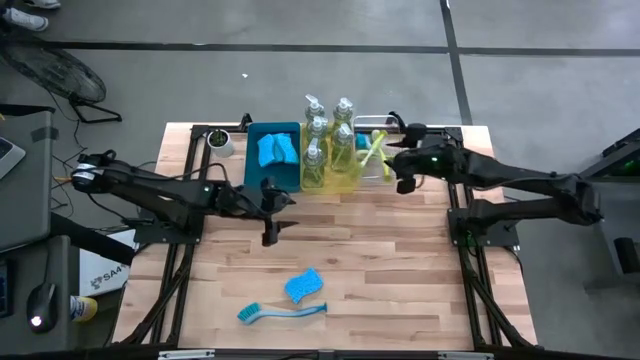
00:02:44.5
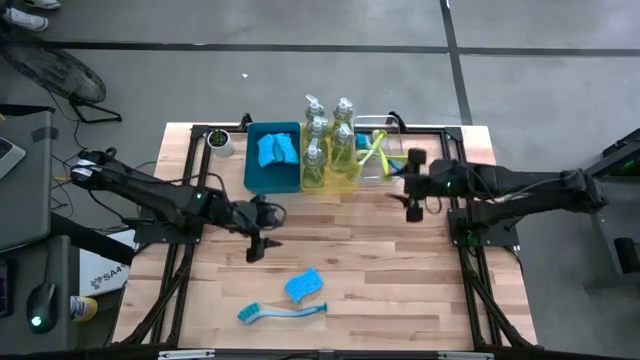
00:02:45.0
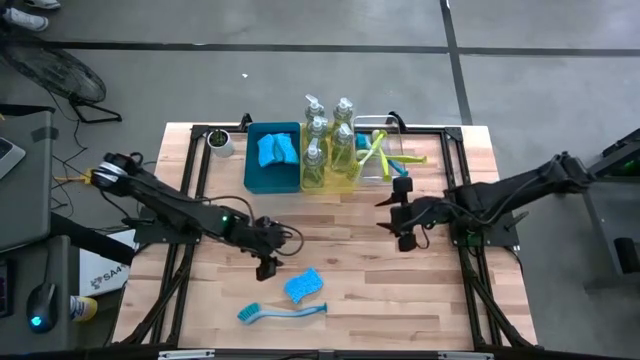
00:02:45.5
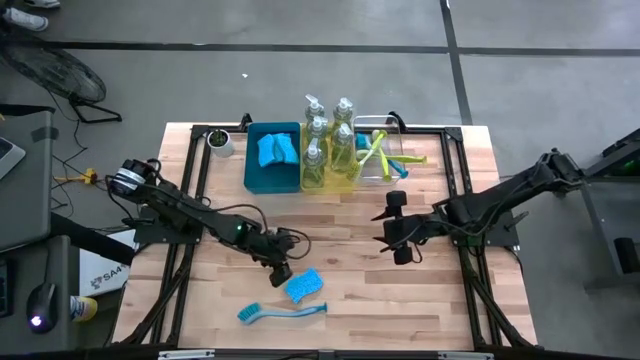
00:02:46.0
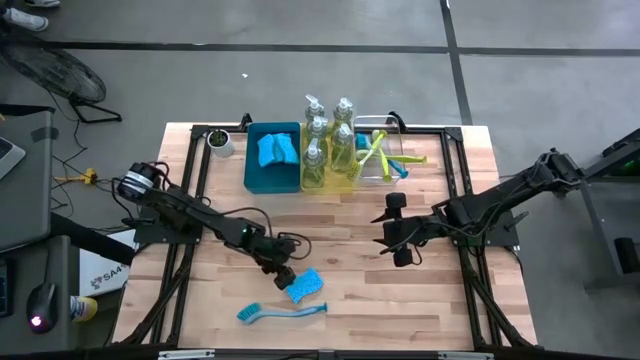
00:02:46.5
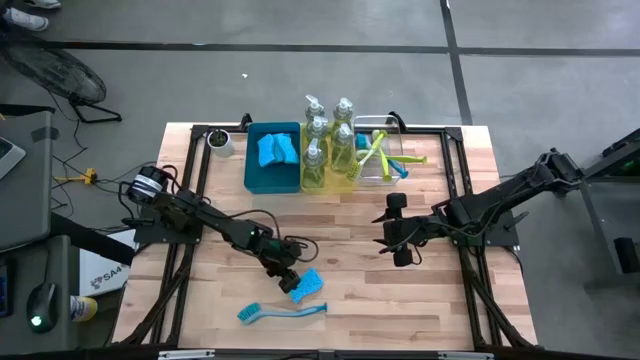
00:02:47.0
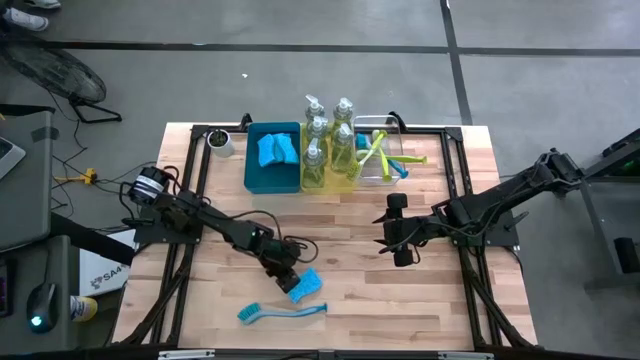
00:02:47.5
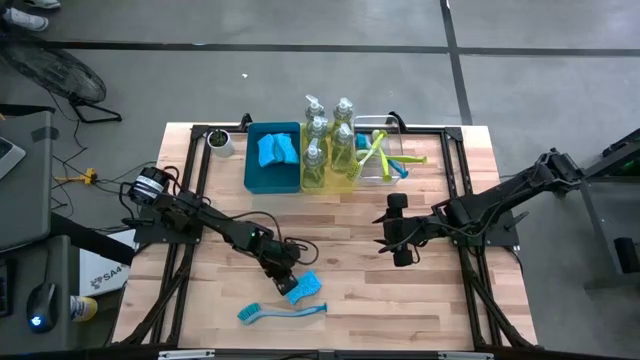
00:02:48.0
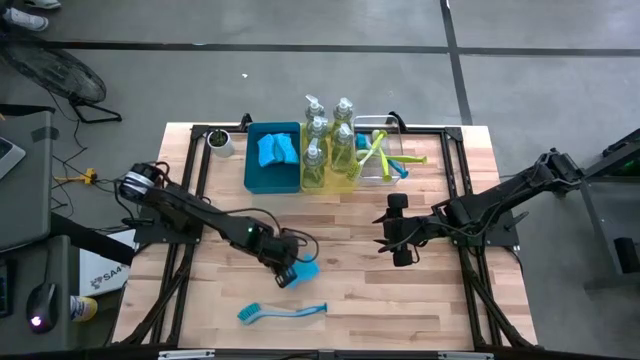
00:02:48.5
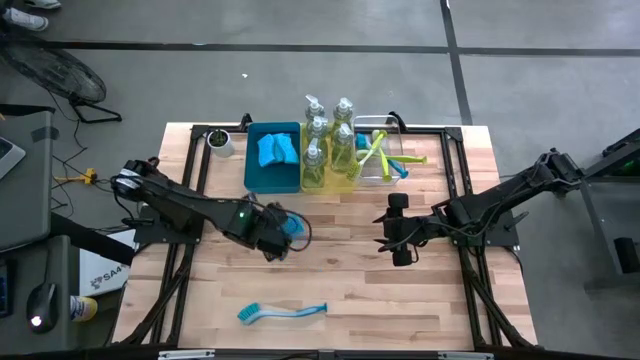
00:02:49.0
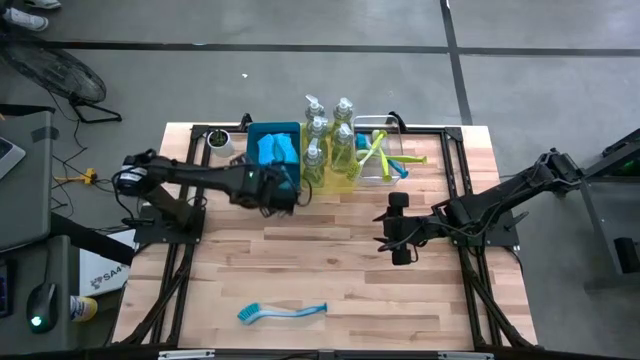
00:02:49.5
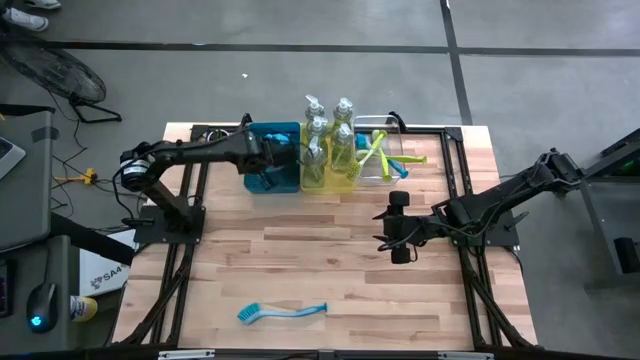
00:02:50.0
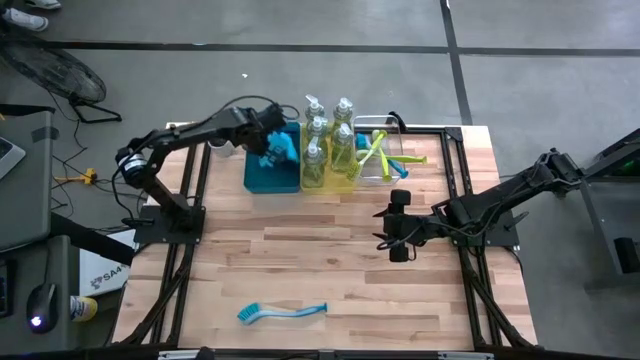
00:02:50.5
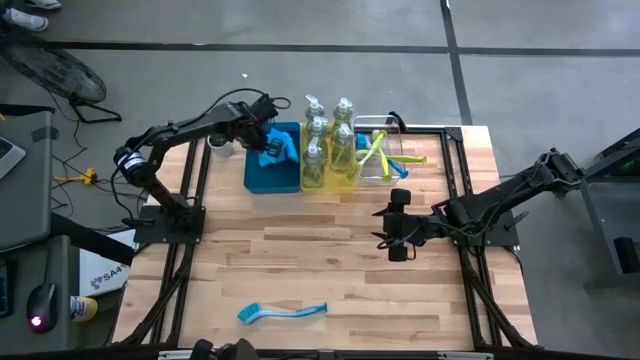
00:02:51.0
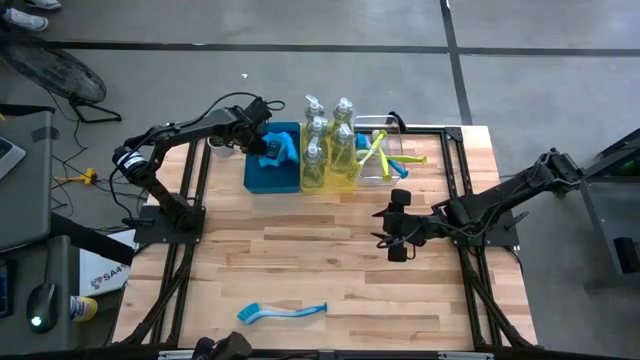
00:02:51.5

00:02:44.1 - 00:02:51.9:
Task: Pick & Place Kitchen Sink Supplies
Put the blue sponge into the blue bin

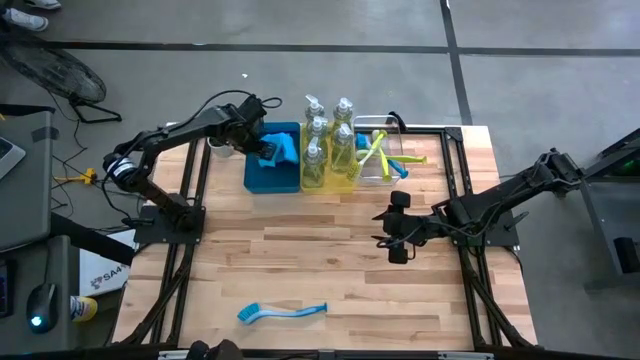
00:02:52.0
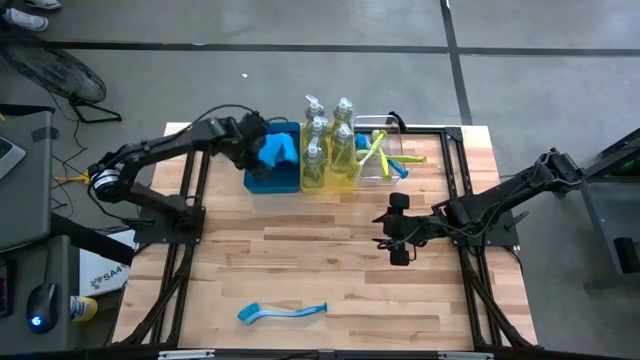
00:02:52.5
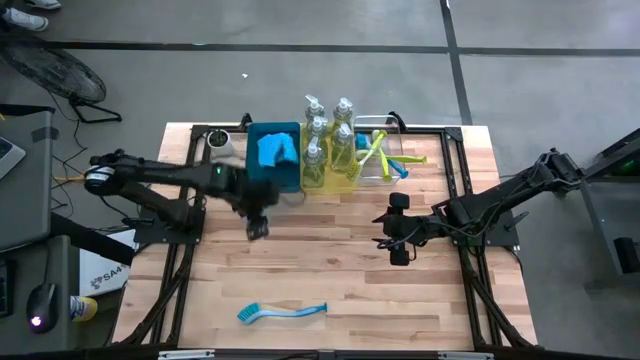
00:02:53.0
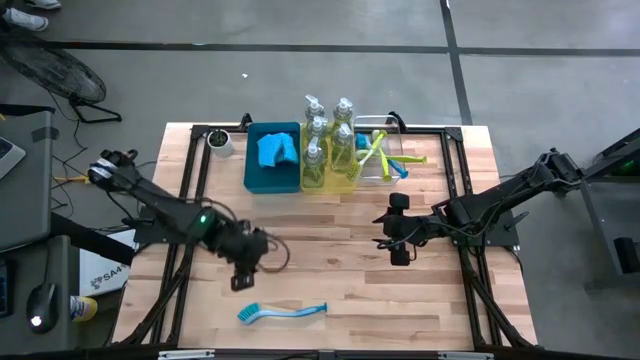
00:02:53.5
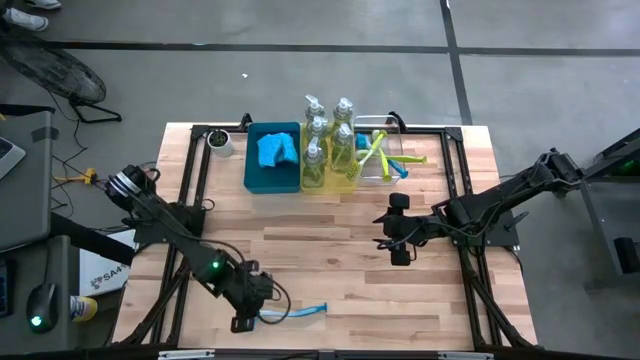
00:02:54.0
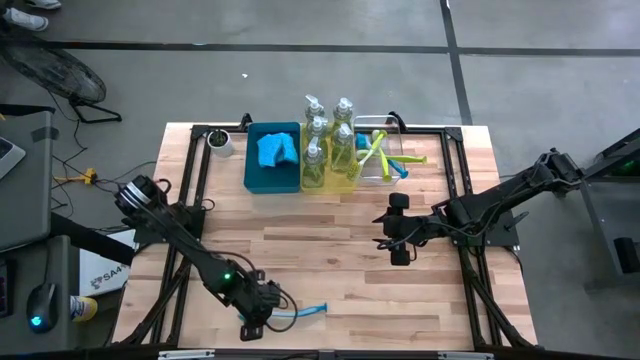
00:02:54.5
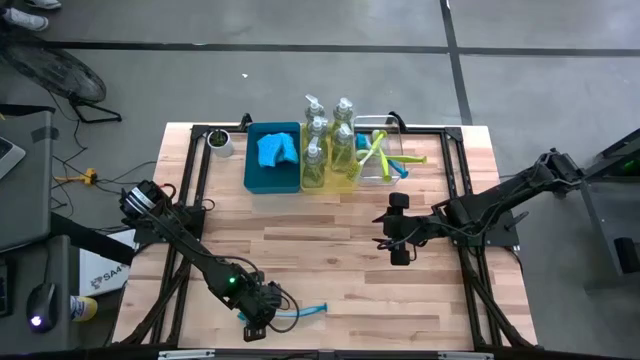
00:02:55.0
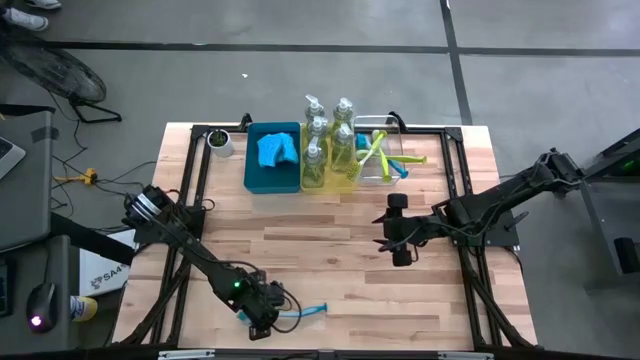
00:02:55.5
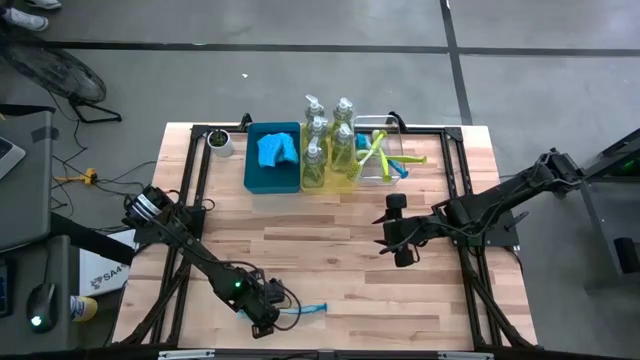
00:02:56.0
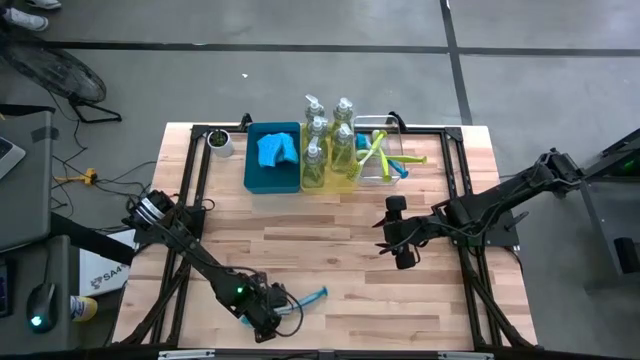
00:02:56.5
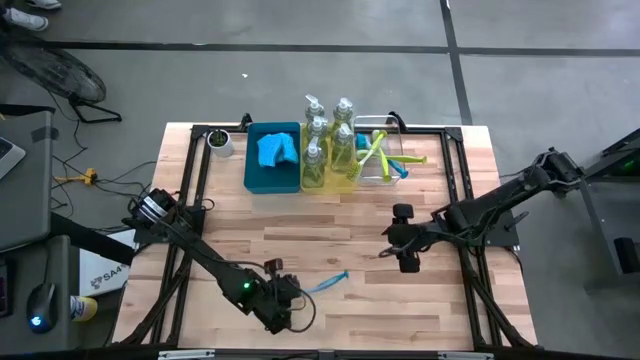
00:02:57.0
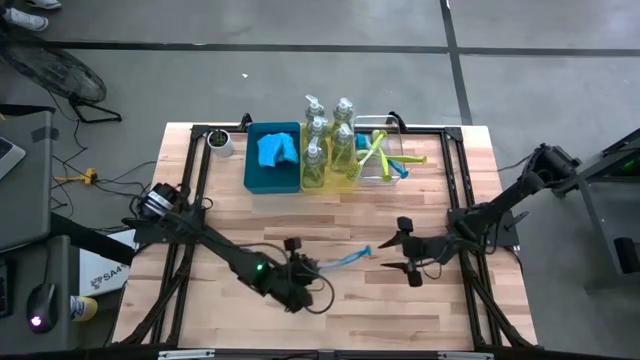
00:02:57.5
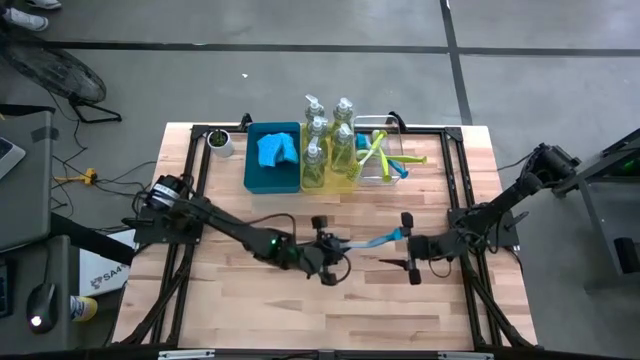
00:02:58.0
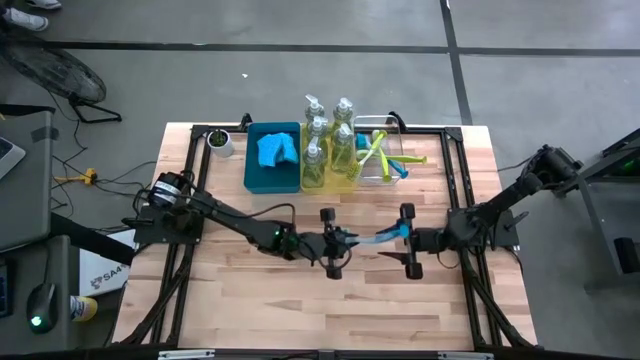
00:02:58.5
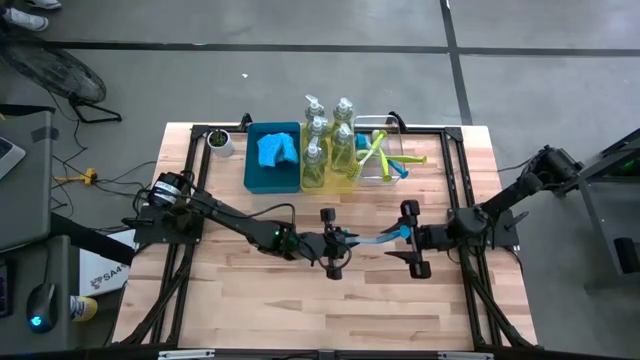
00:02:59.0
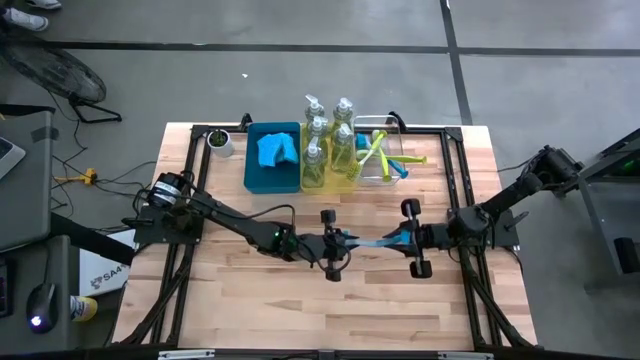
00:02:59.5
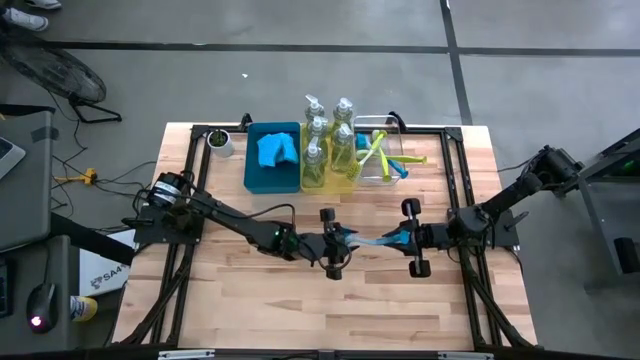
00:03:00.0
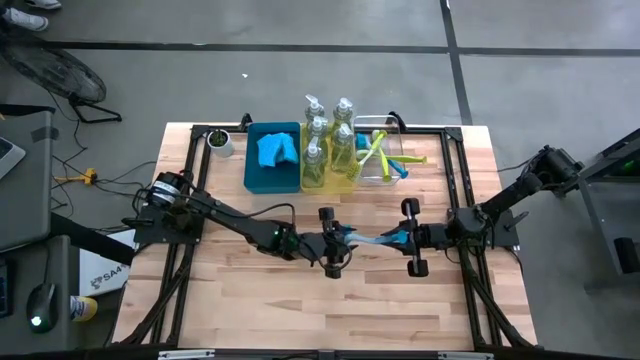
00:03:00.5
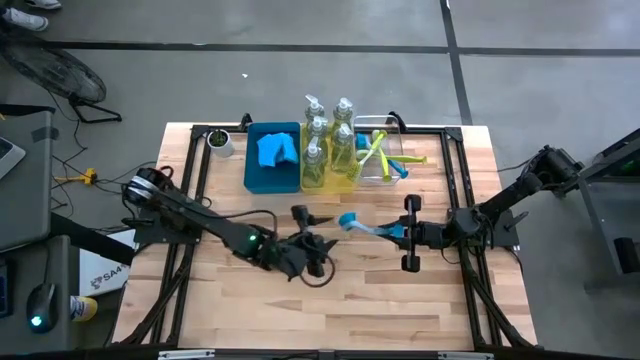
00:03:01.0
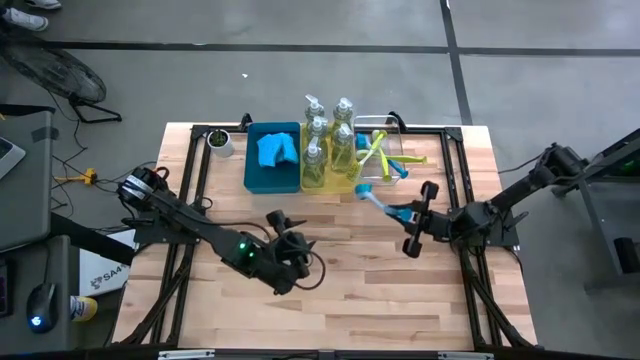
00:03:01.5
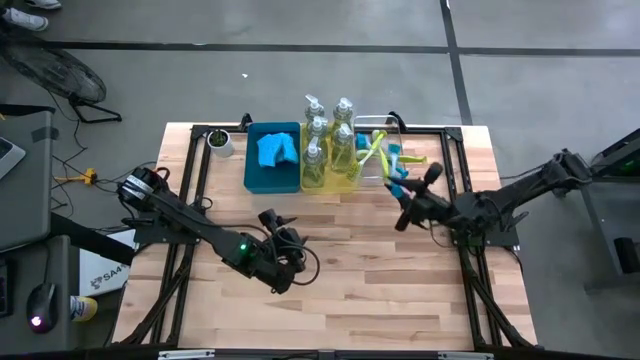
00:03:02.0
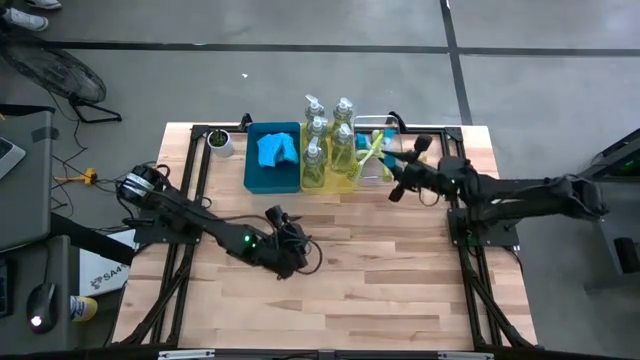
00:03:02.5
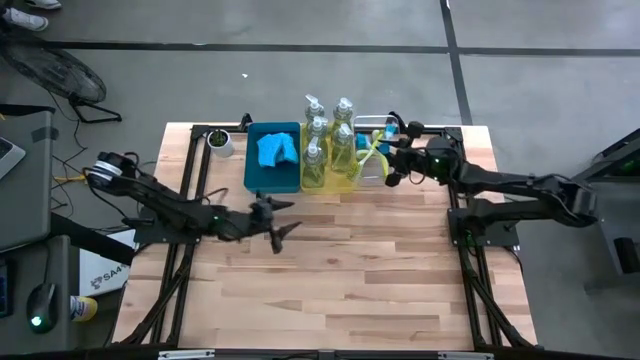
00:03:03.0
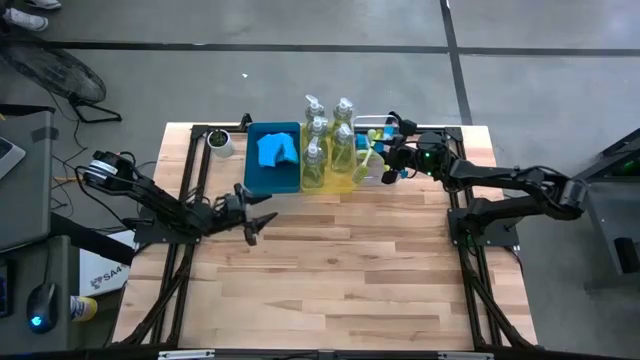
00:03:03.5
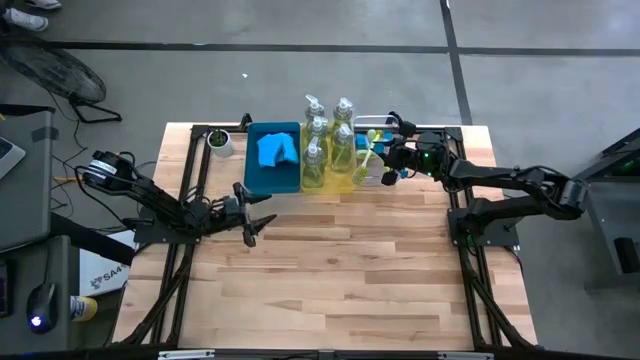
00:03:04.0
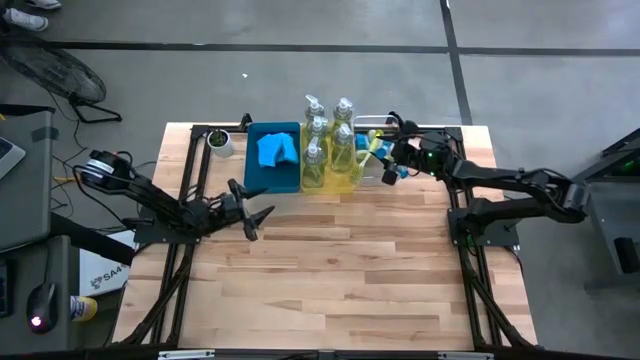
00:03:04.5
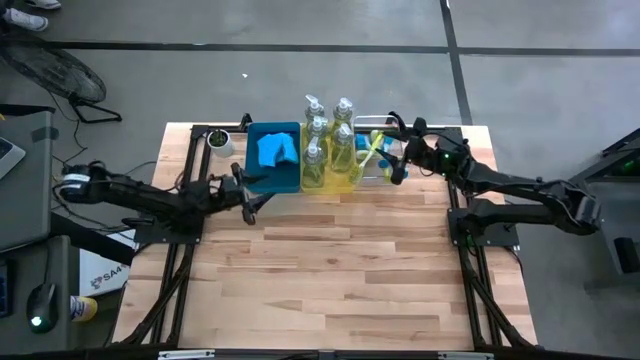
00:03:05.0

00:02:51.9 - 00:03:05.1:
Put the blue toilet brush into the transparent bin
